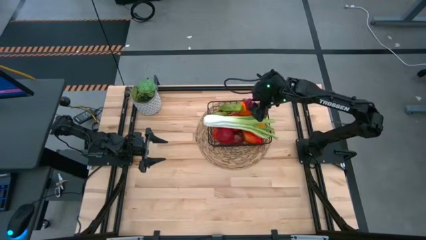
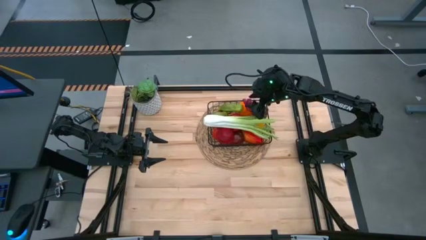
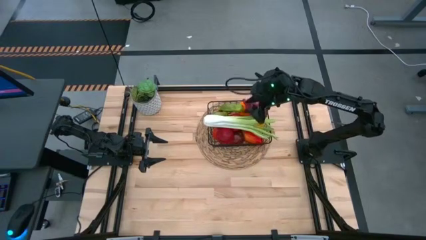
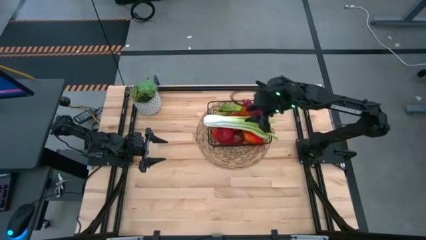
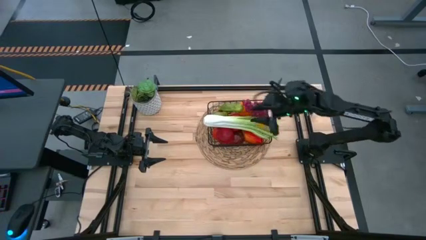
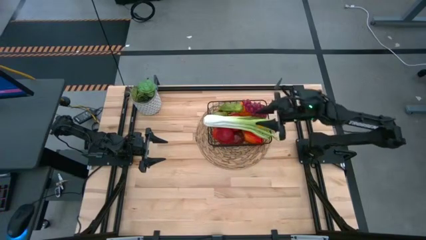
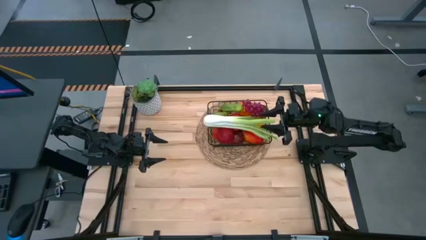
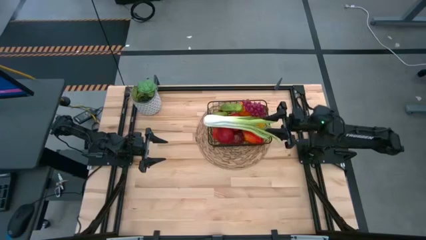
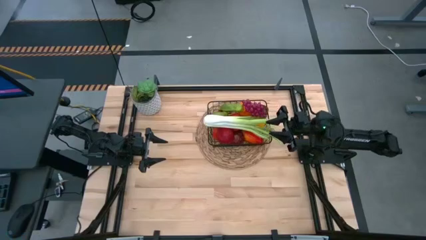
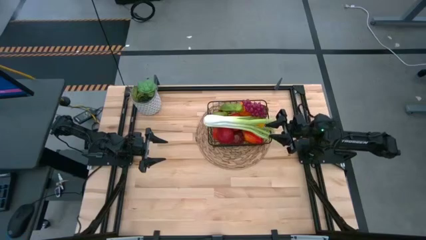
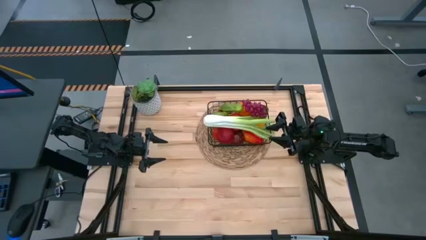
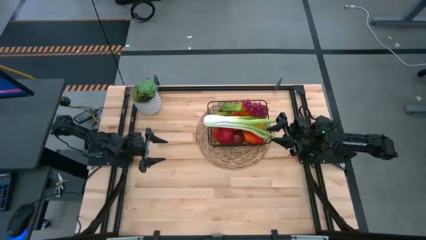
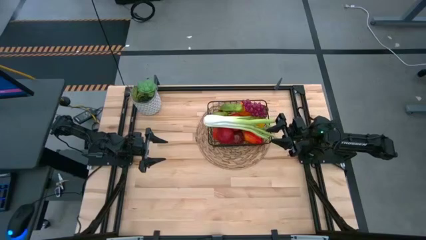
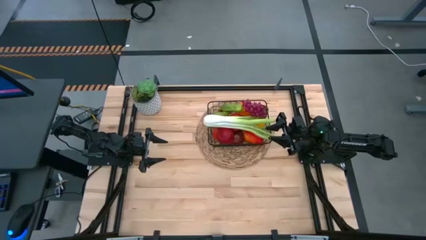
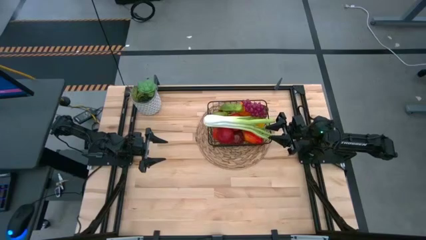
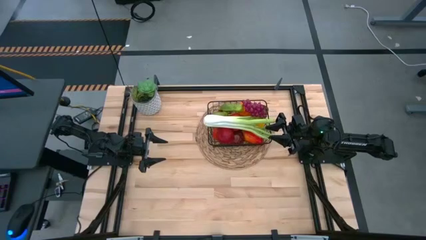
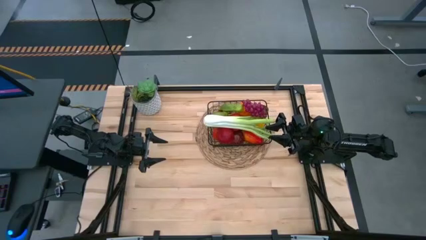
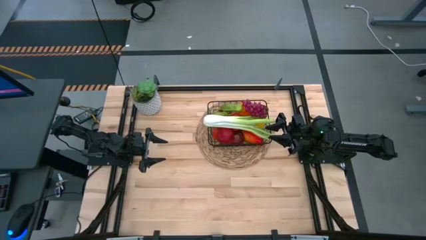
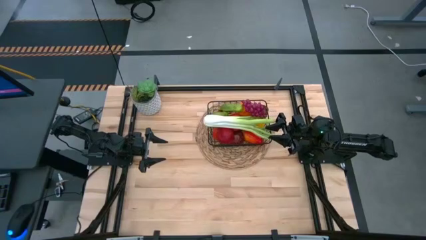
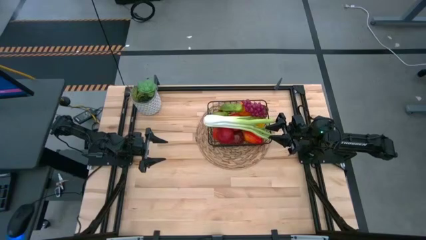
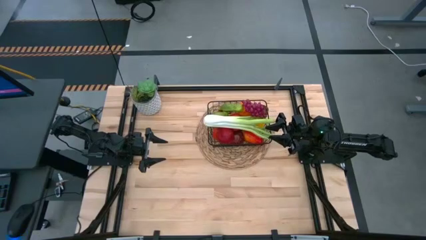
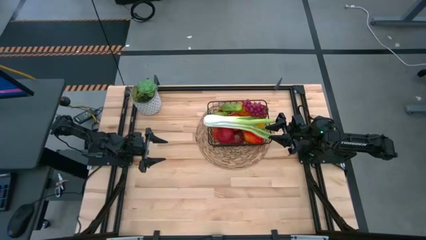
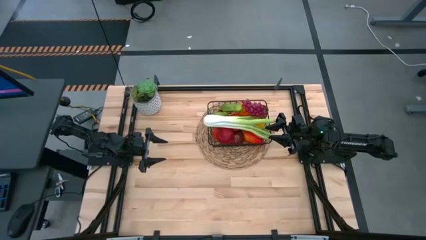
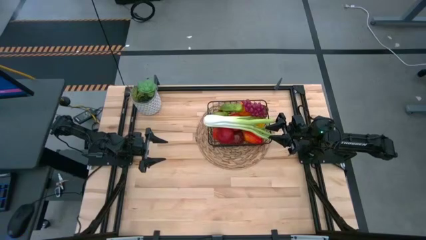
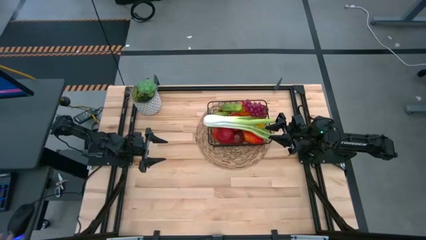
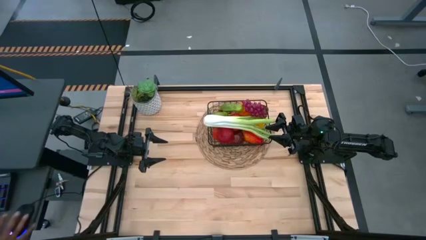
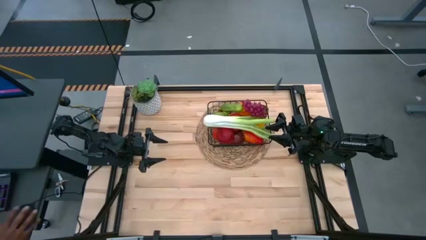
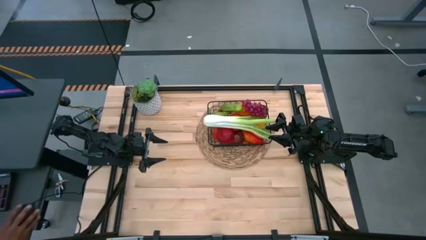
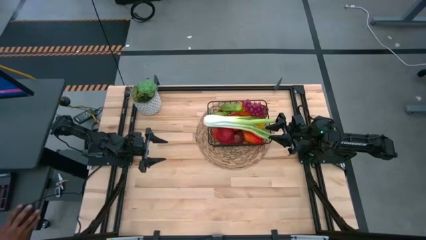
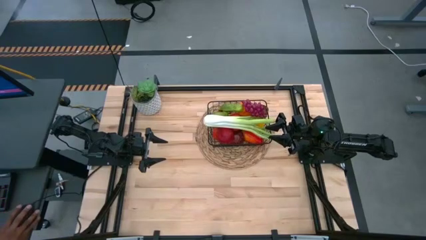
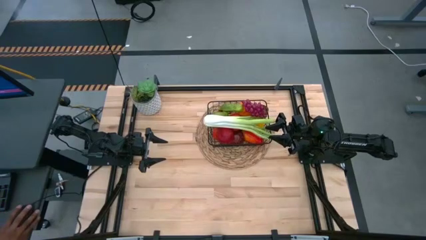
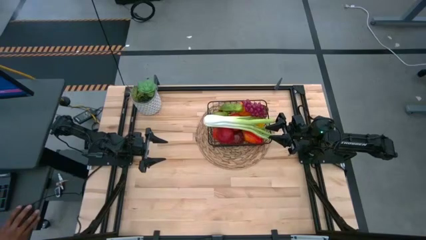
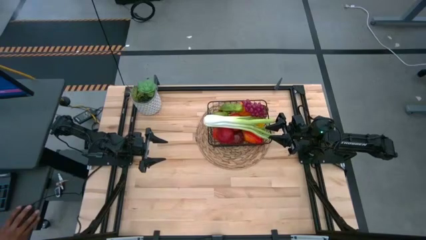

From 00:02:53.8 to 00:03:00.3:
Task: Build produce basket
Return to Home Position

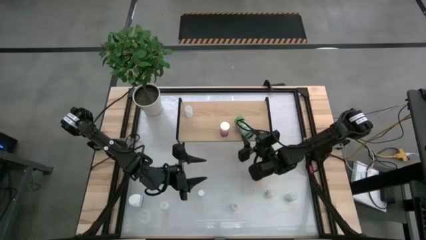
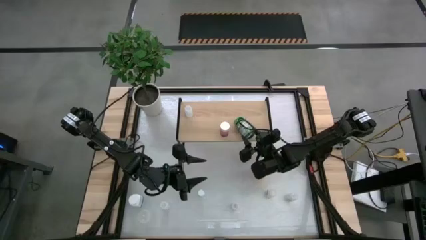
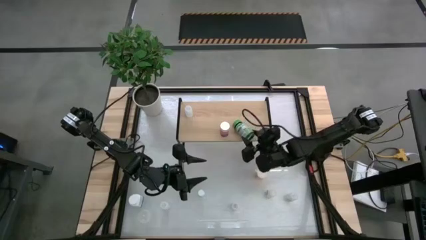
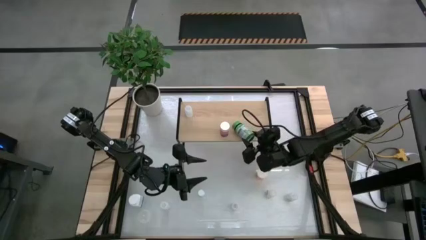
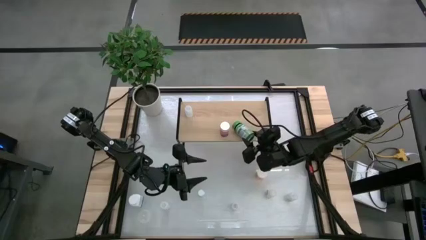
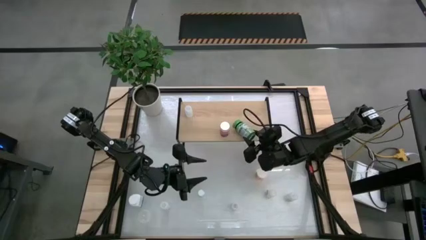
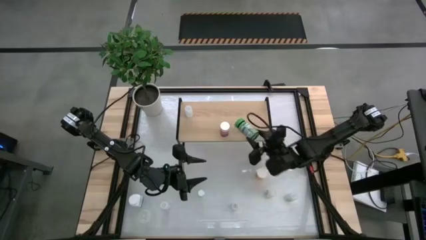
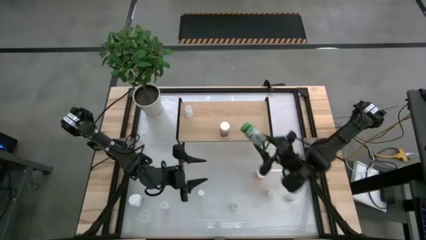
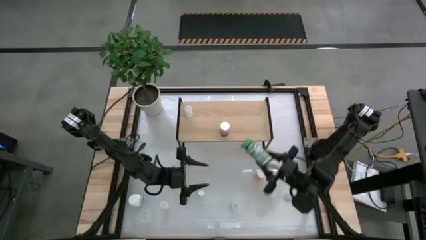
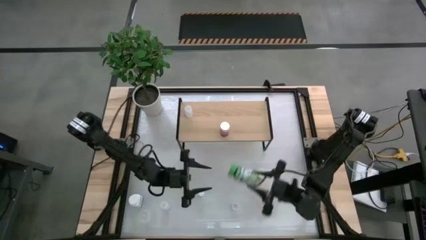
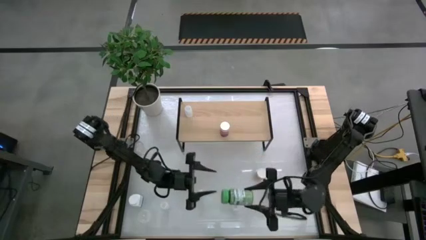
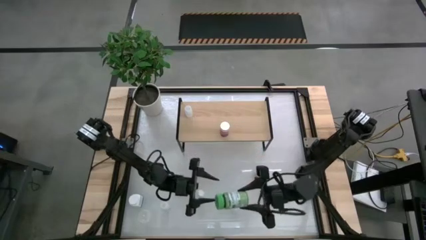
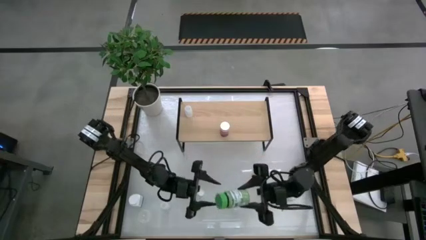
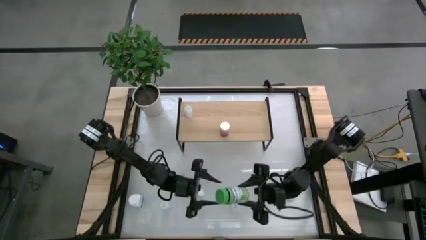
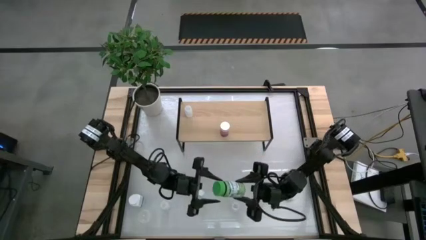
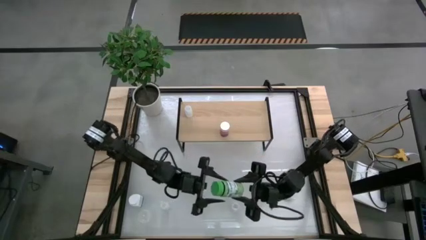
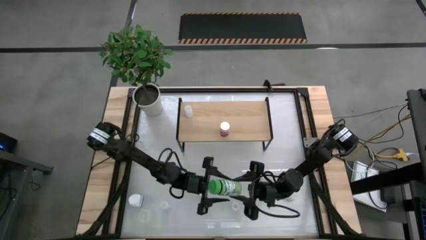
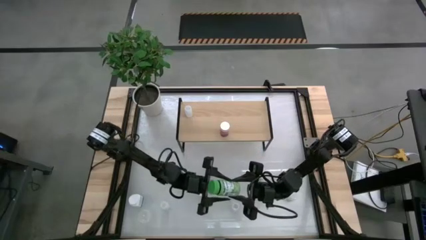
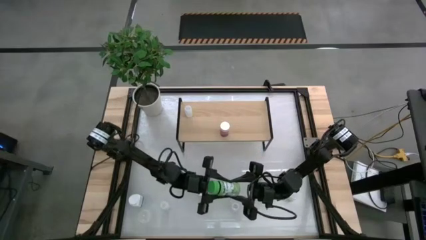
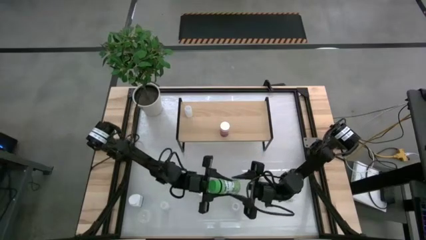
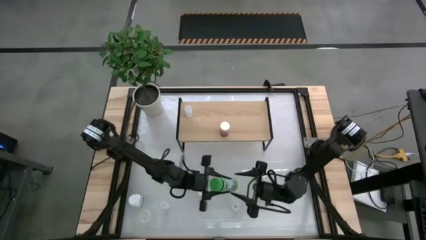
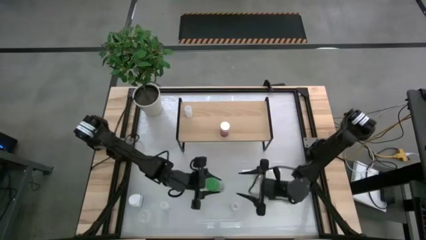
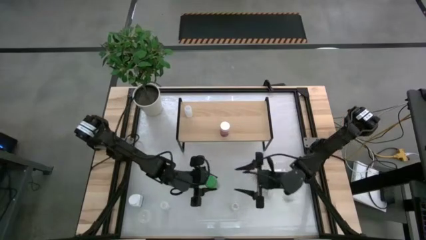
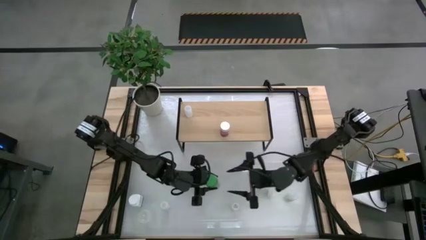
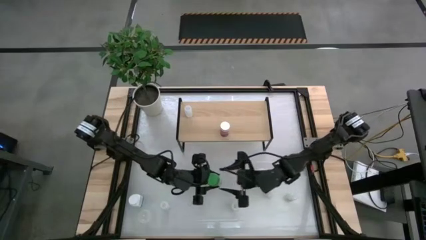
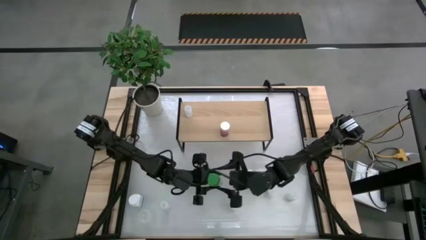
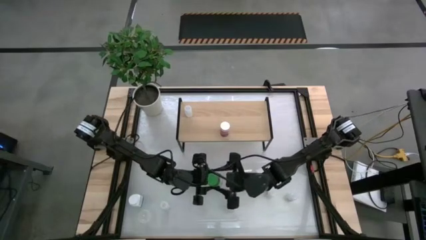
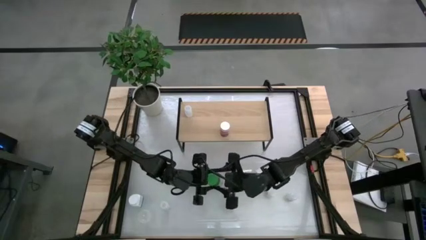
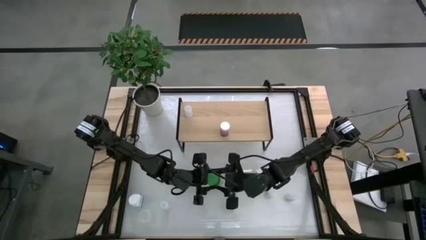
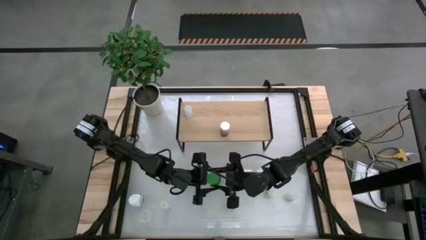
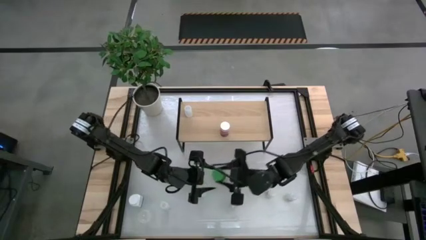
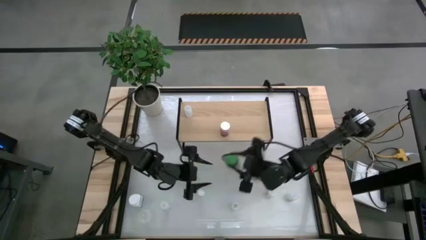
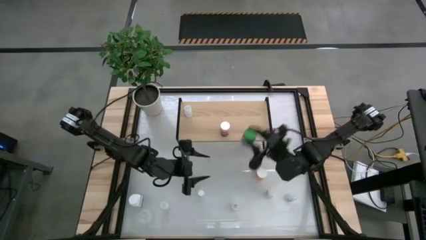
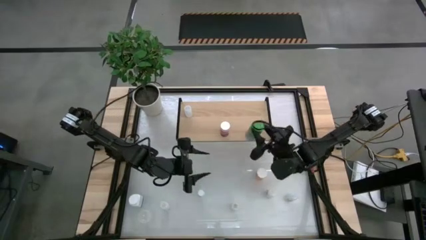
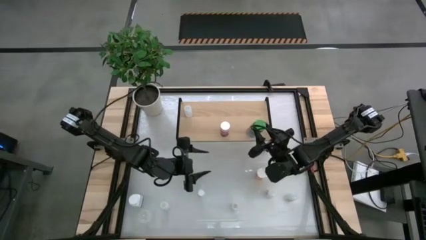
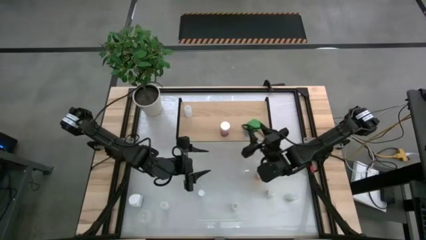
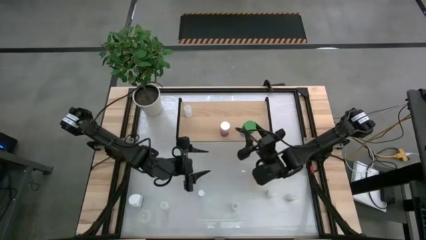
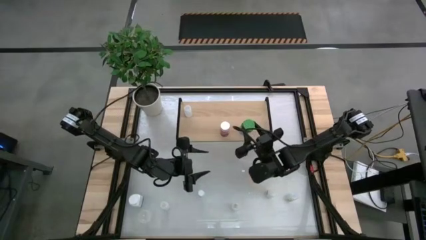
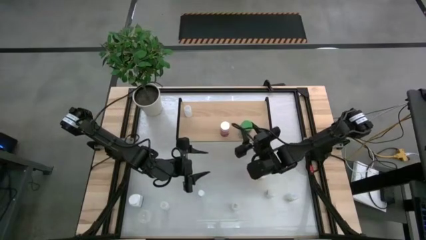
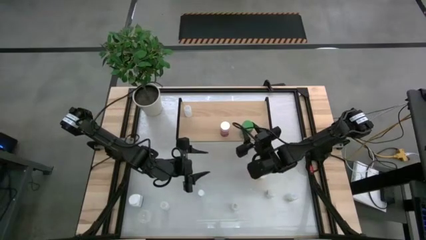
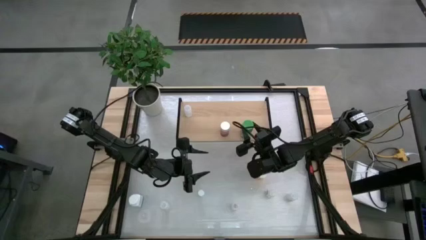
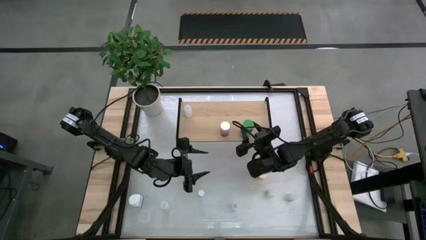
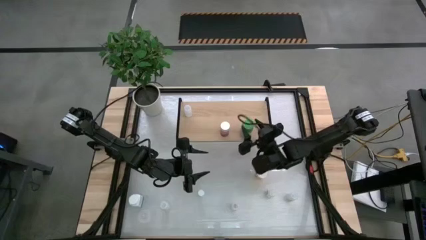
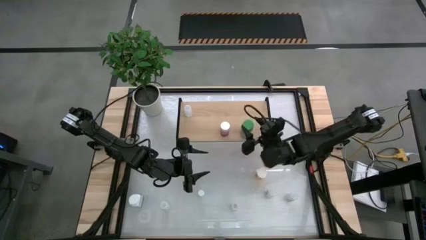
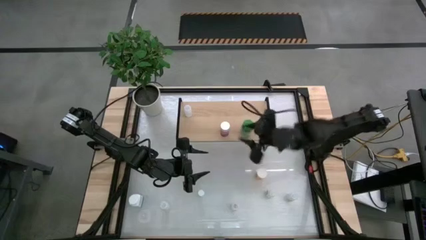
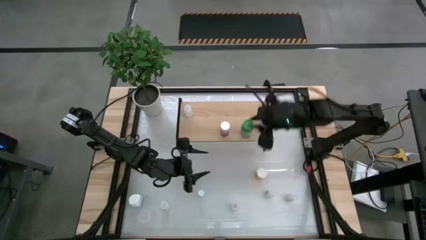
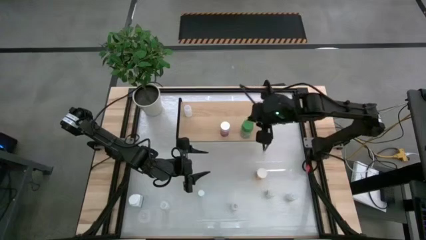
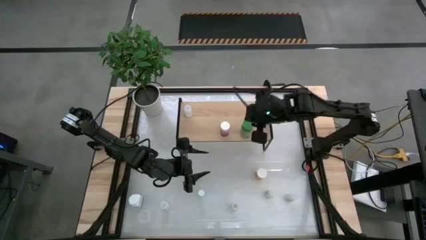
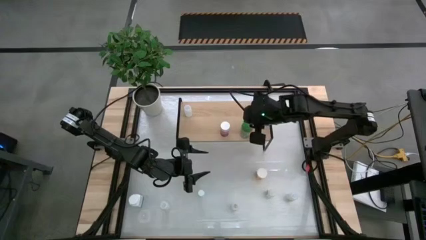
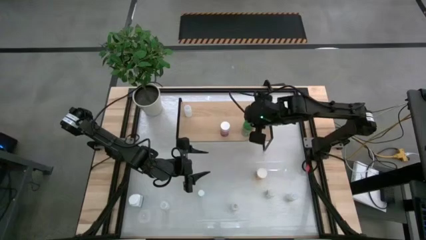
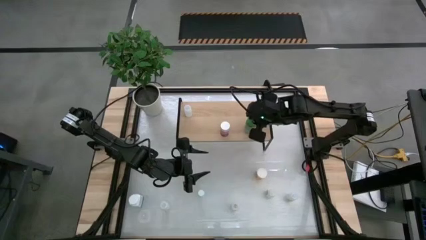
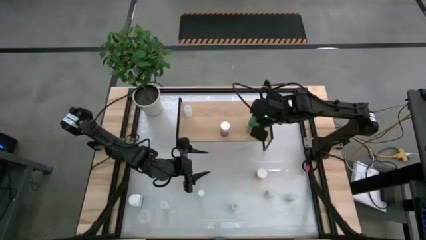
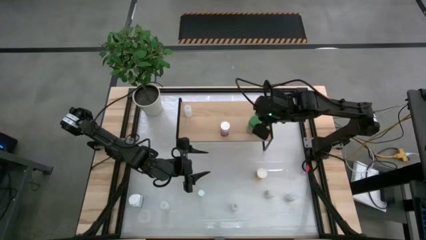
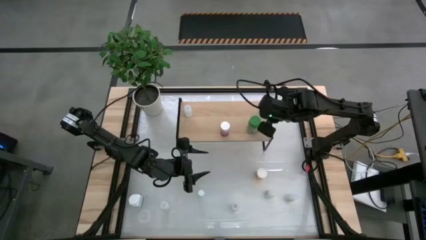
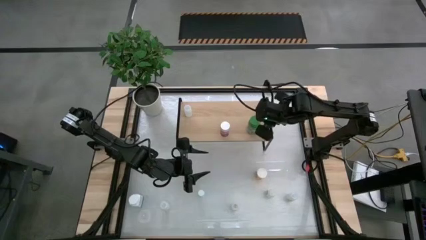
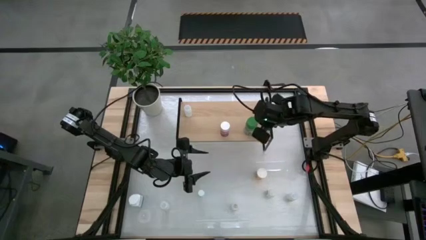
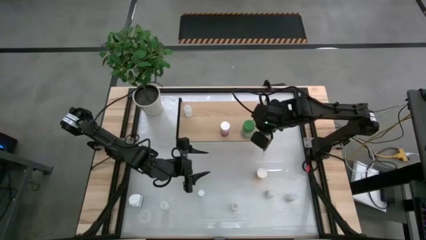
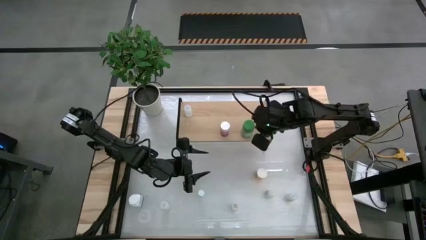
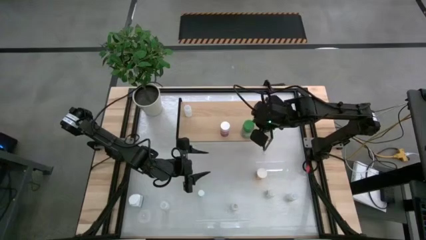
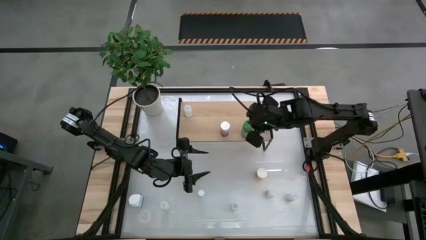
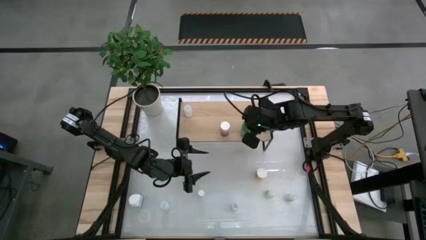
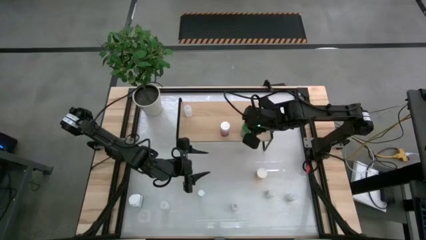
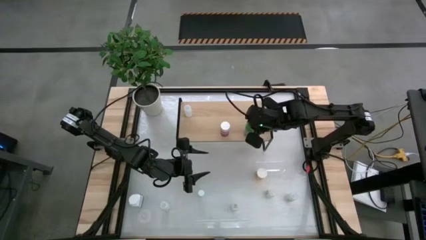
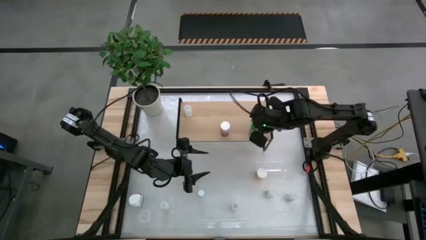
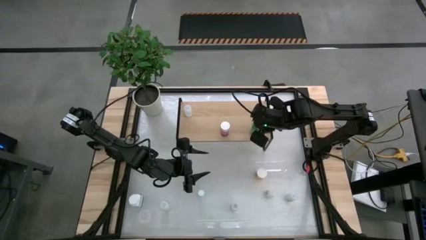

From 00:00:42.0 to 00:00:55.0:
Task: Pick and place medicine bottles onto shelf by color
Put the green pill bottle on the shelf
